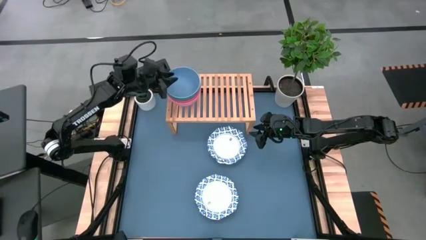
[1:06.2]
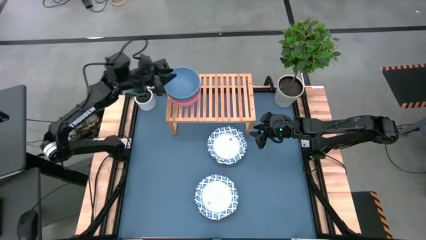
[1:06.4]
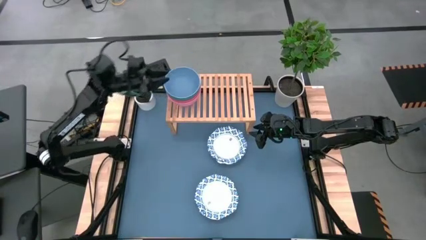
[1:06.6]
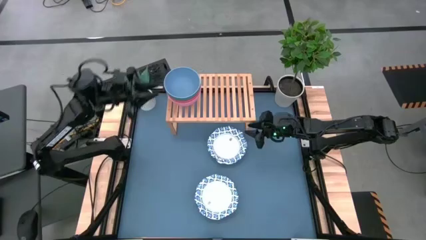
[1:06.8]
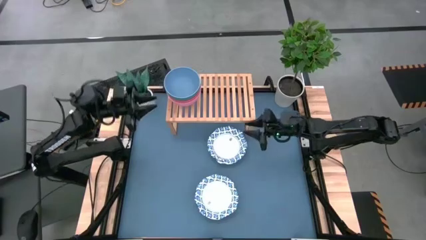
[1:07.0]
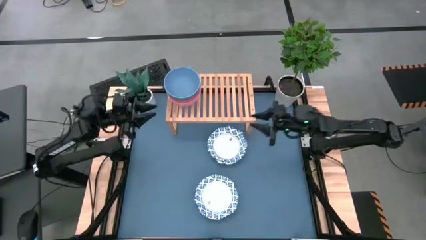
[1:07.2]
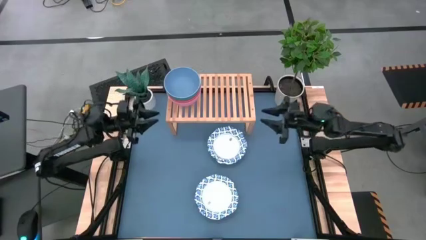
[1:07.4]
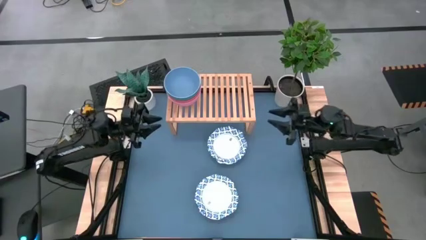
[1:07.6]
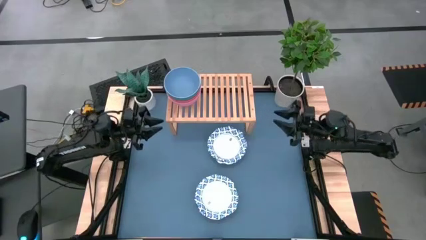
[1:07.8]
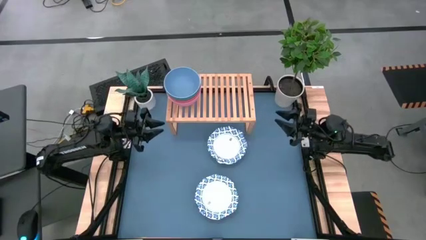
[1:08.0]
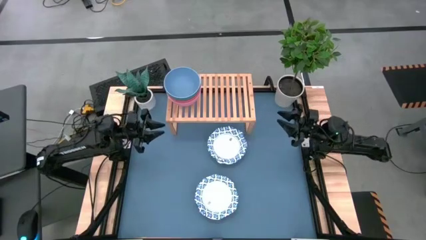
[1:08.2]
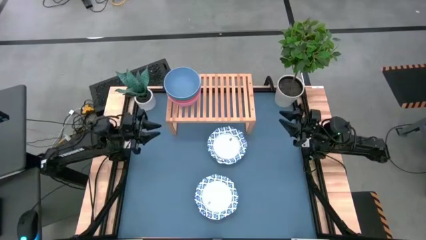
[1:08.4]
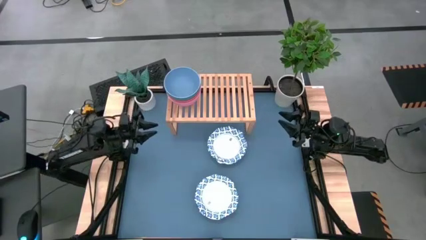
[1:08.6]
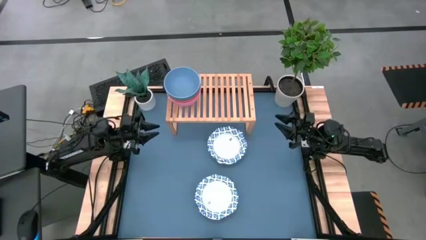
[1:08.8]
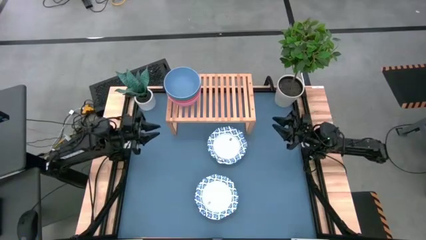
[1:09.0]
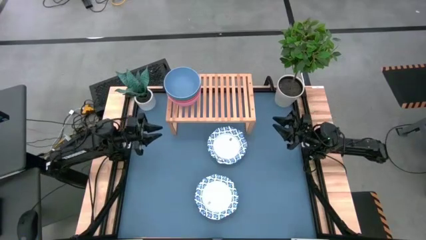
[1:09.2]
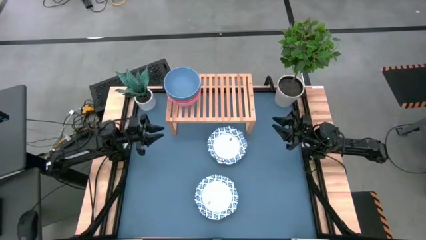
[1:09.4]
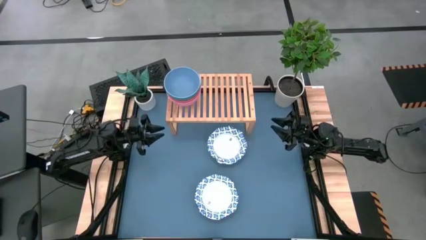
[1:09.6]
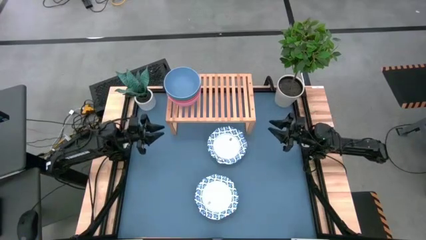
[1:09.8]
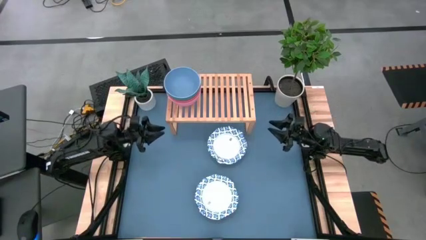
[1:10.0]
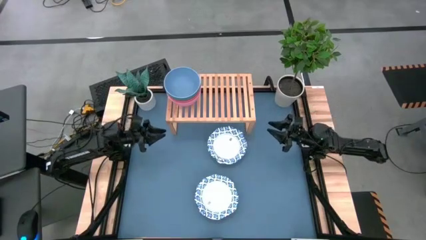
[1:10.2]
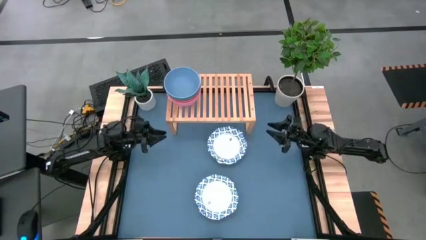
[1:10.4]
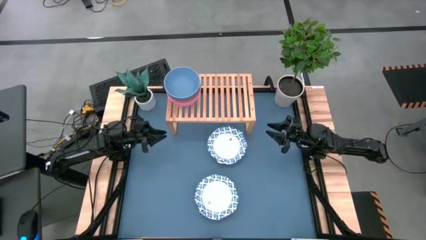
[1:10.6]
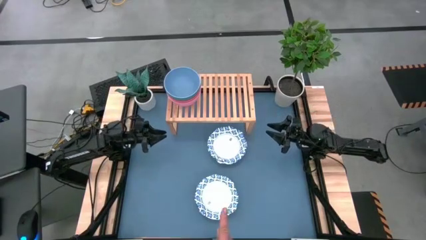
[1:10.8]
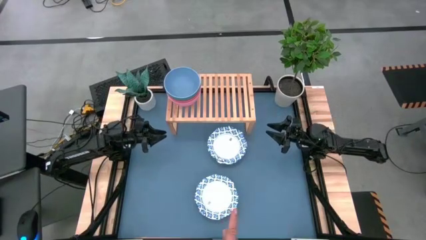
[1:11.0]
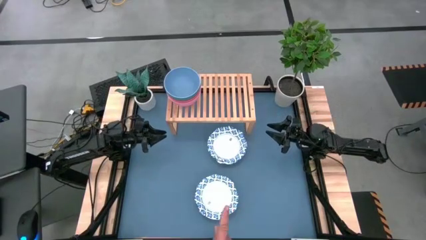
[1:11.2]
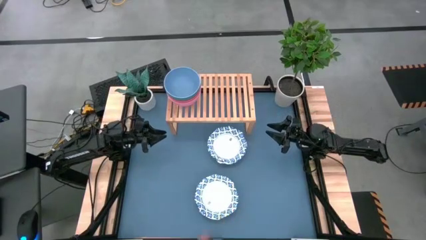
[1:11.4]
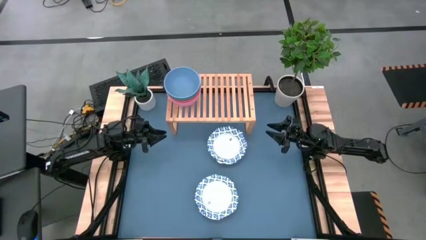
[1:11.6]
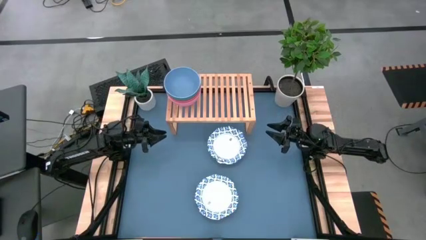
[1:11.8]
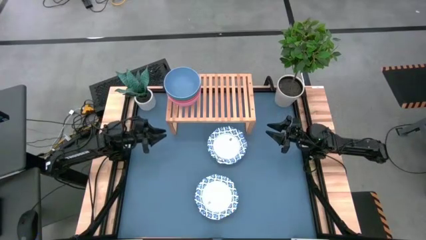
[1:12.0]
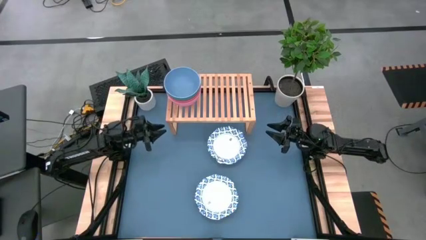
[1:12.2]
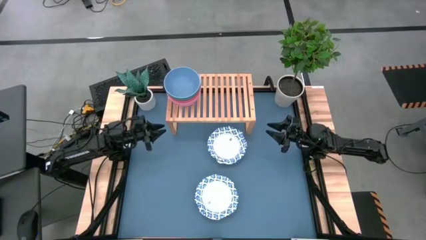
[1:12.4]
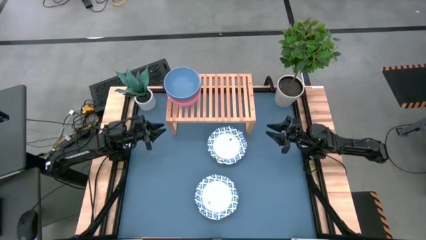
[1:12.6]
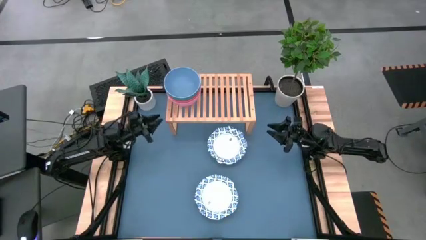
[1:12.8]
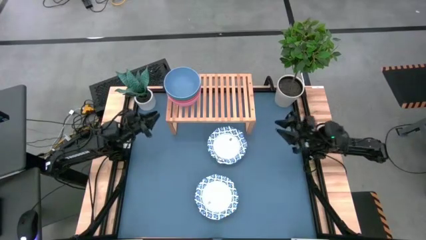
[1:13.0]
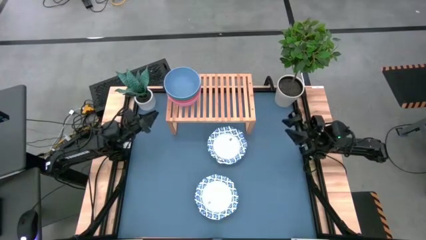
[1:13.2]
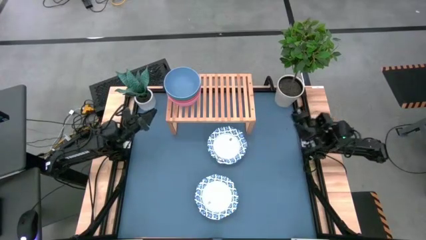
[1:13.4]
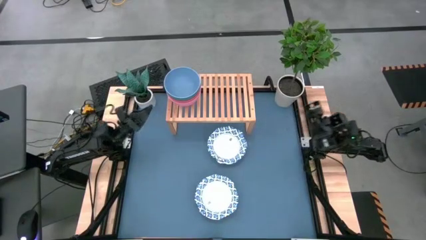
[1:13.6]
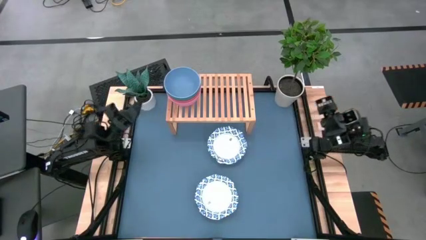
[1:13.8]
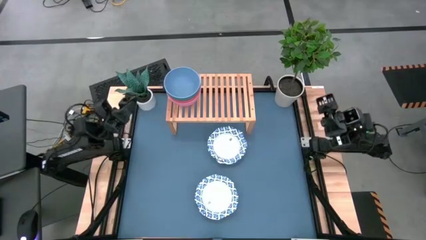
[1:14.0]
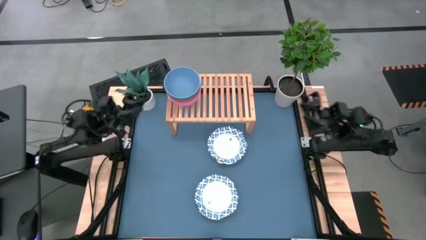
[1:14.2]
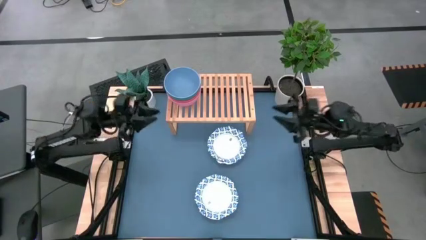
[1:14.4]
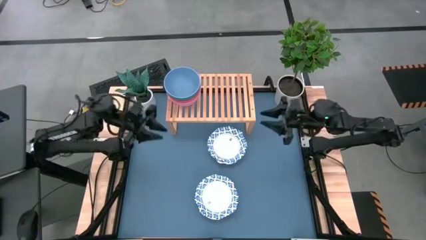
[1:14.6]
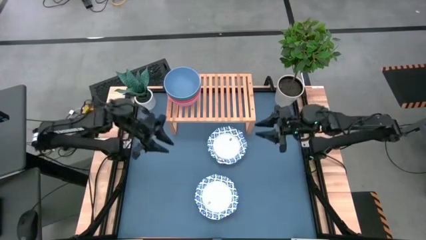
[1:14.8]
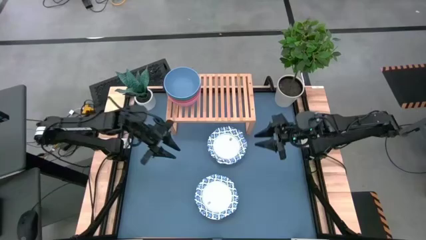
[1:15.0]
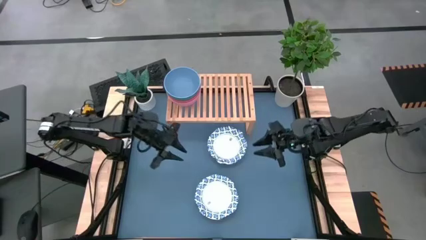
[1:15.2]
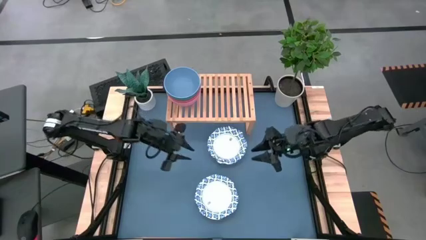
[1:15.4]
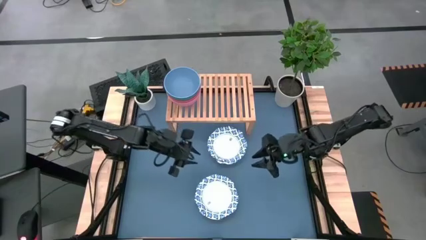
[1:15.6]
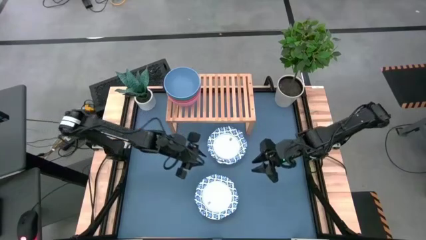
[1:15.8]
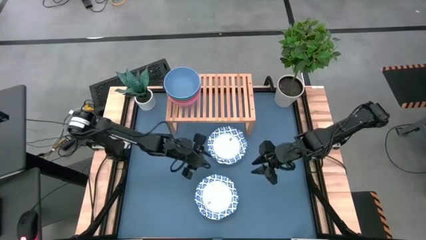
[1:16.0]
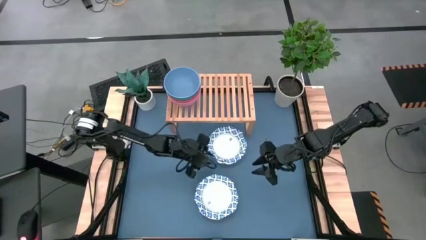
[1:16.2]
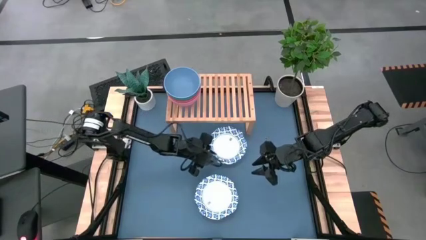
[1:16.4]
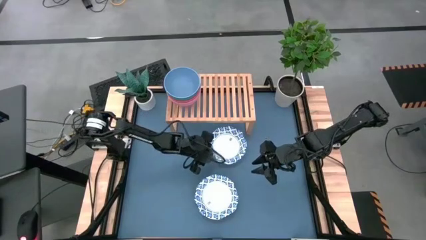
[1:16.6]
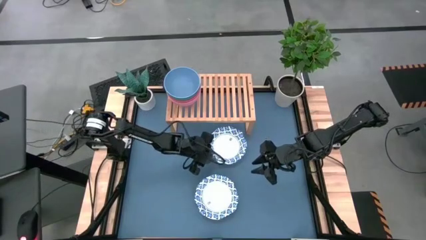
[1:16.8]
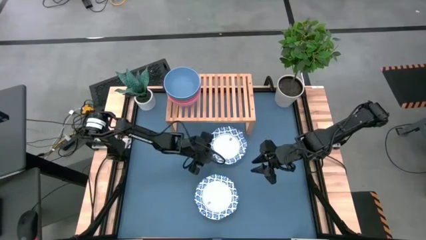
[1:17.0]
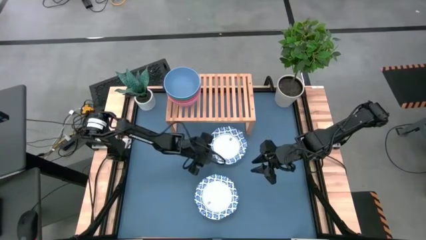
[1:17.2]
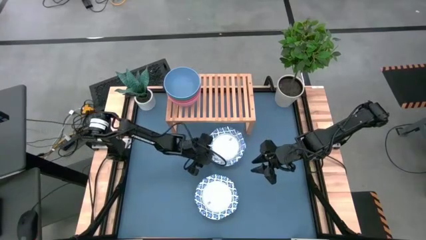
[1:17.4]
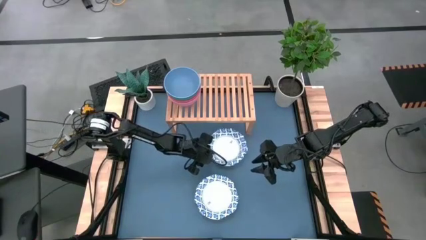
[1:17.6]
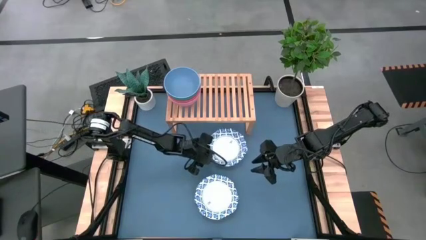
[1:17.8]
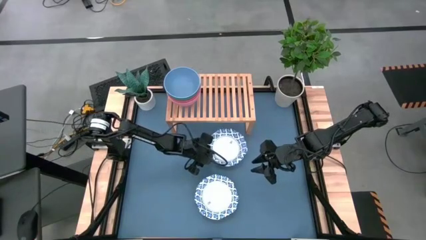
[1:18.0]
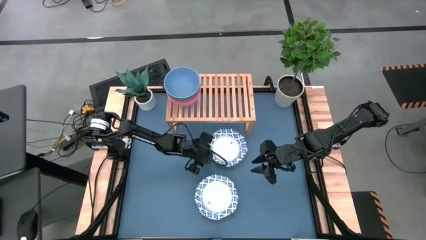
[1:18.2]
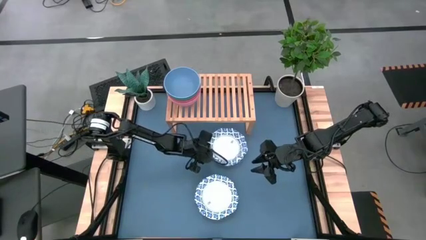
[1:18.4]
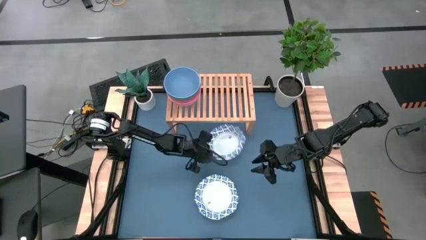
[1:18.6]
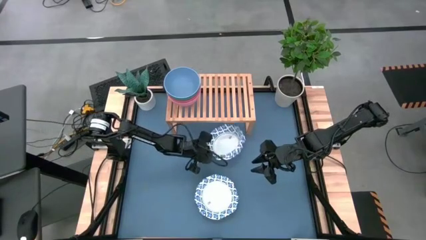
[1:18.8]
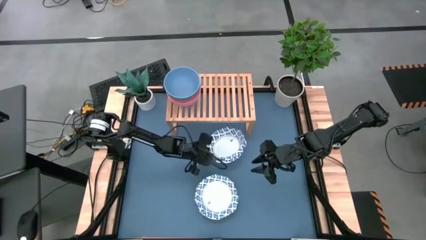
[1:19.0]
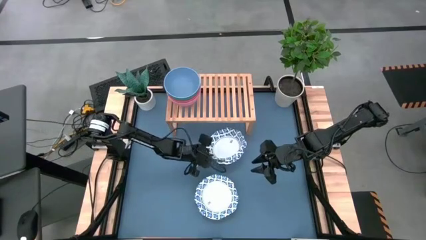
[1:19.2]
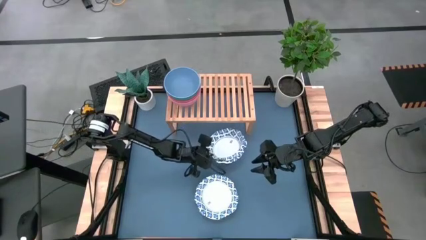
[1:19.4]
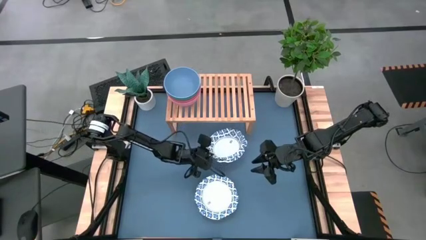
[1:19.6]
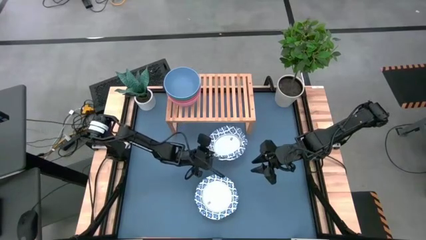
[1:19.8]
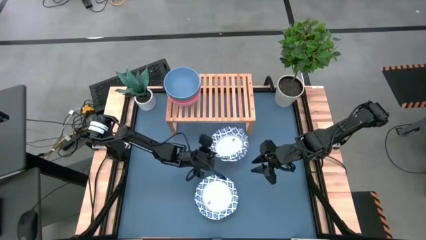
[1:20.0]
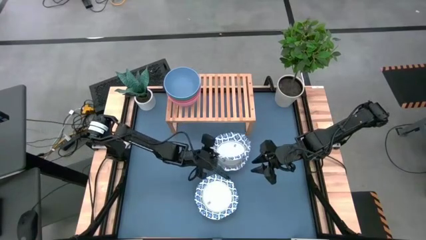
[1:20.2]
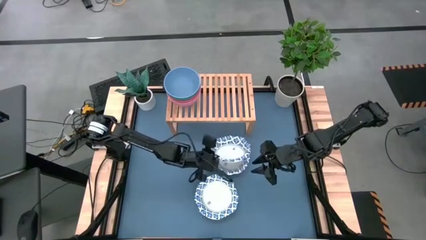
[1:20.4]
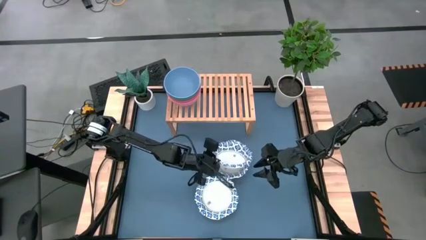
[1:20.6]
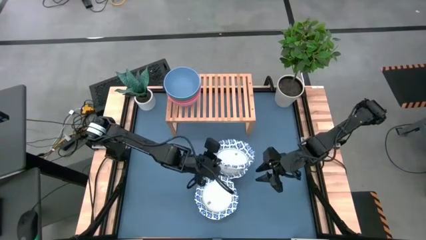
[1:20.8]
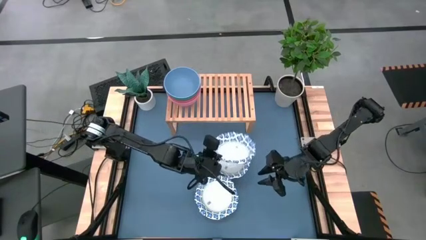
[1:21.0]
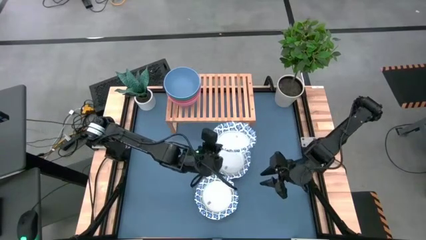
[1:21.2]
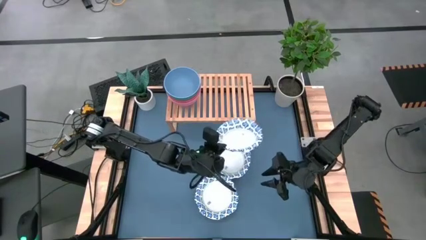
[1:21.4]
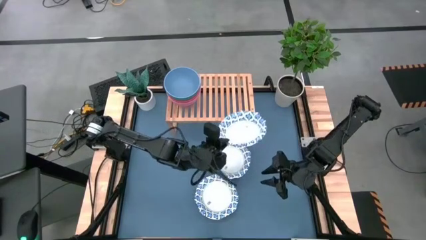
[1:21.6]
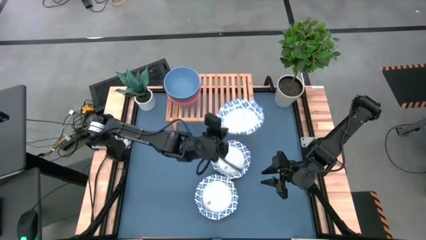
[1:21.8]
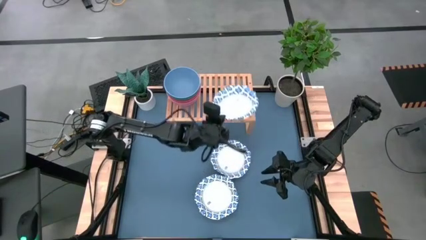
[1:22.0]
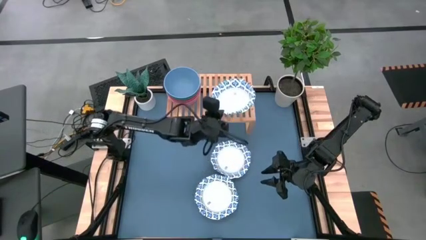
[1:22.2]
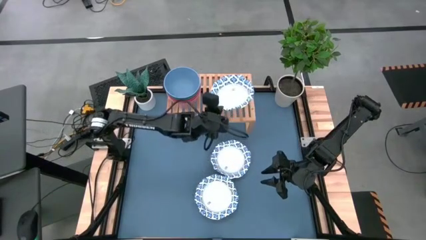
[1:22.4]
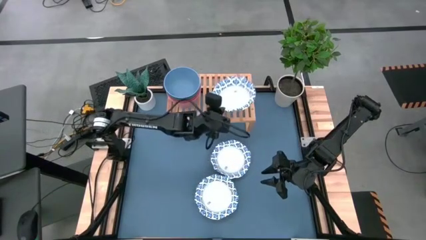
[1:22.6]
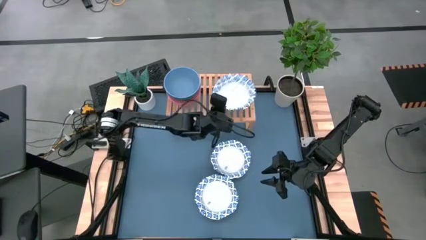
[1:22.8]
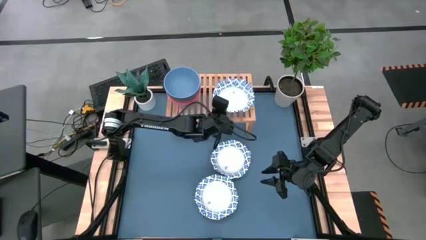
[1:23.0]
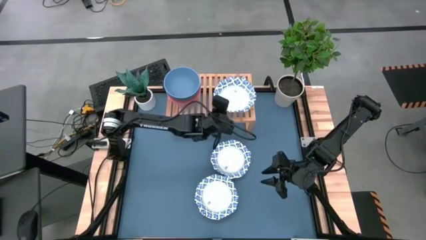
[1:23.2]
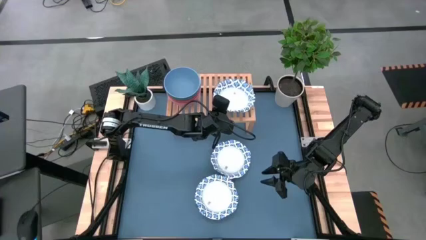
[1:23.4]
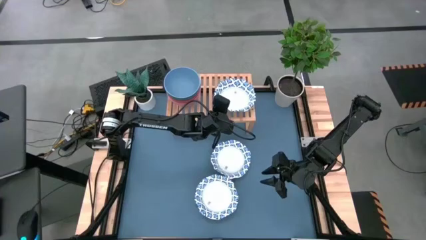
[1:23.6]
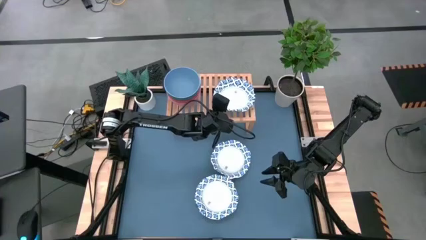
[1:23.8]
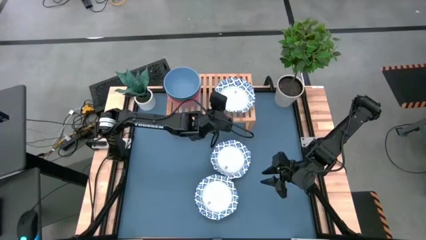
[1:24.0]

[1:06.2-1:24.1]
Task: Place and stack bowls onto a shelf
Put the top white patterned bowl on the shelf
